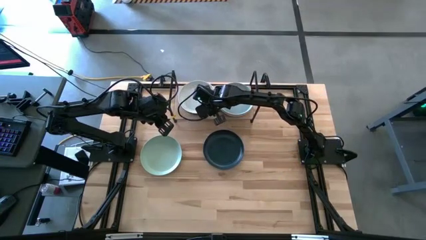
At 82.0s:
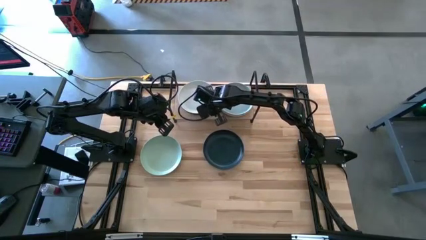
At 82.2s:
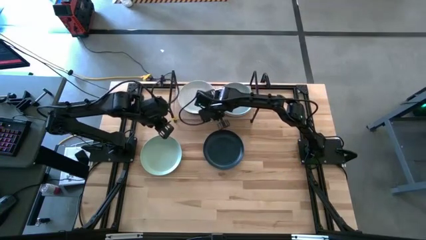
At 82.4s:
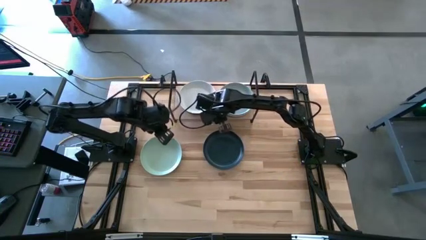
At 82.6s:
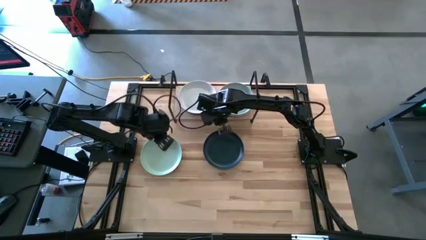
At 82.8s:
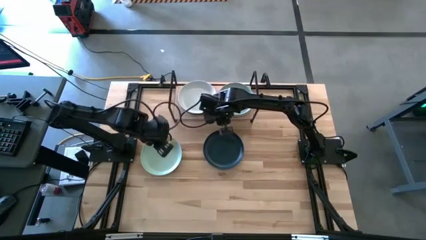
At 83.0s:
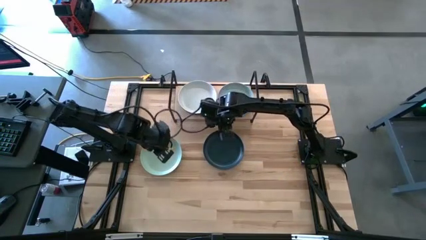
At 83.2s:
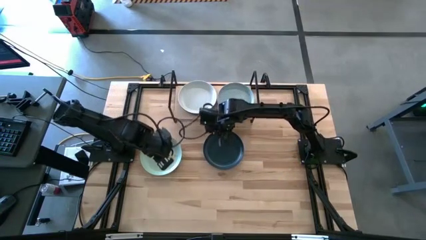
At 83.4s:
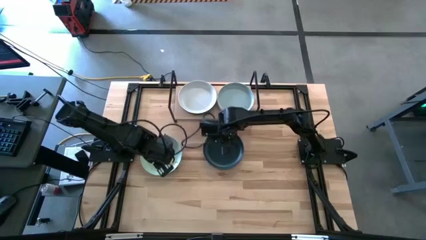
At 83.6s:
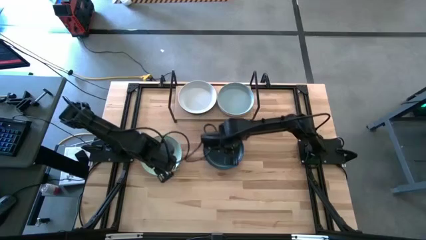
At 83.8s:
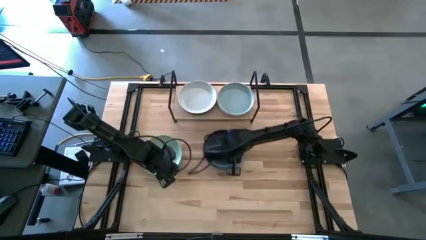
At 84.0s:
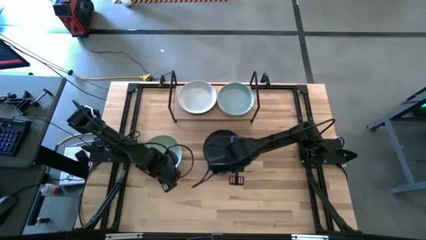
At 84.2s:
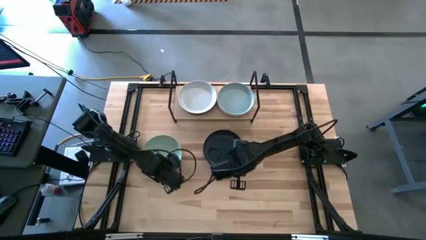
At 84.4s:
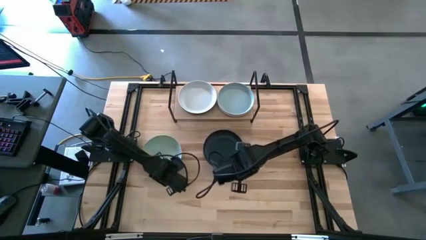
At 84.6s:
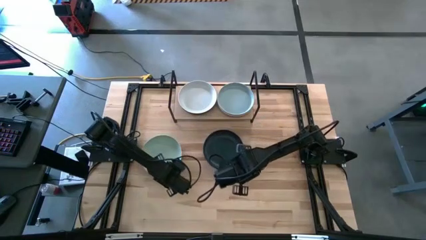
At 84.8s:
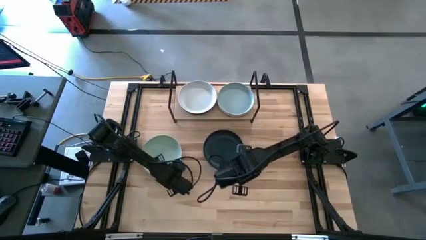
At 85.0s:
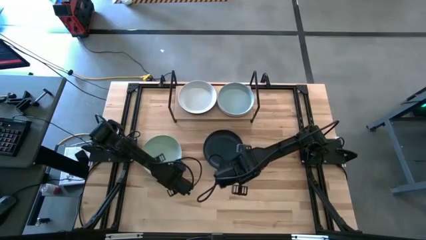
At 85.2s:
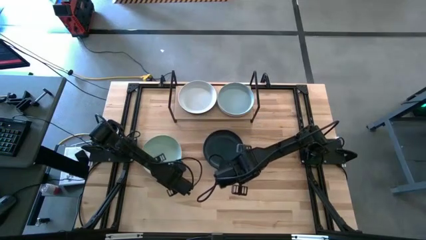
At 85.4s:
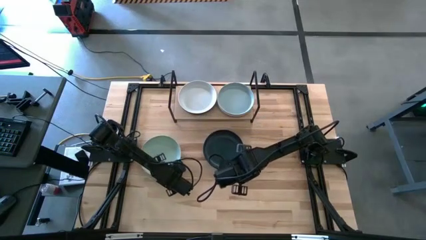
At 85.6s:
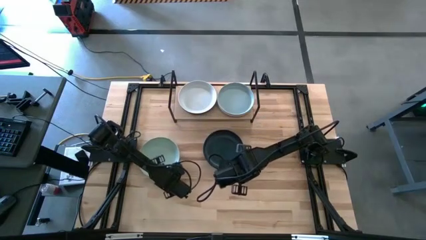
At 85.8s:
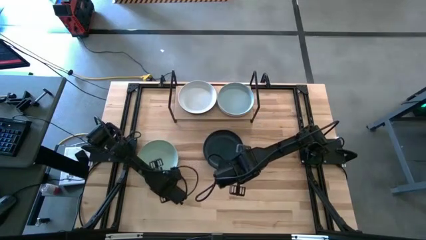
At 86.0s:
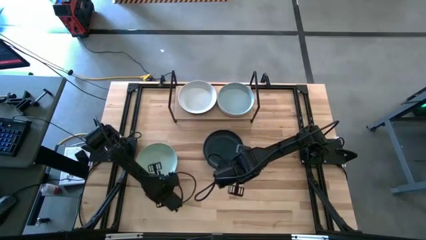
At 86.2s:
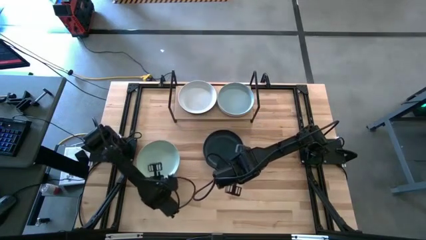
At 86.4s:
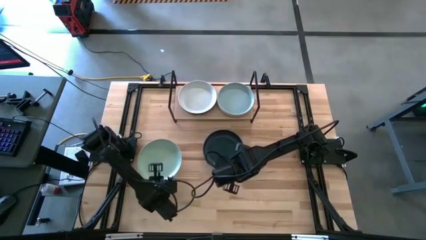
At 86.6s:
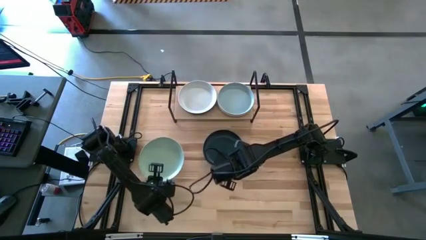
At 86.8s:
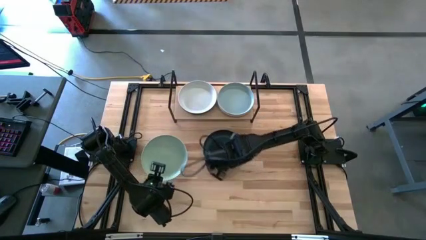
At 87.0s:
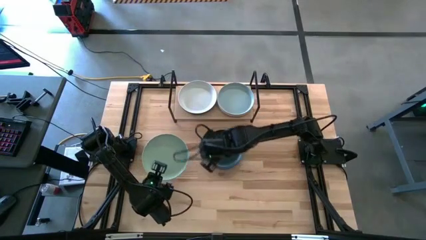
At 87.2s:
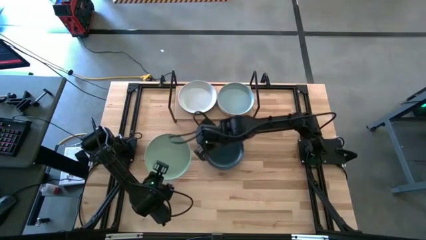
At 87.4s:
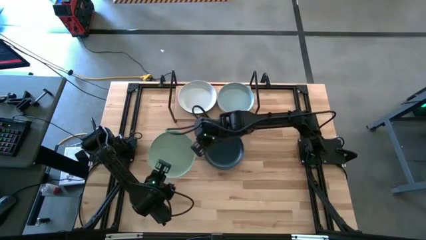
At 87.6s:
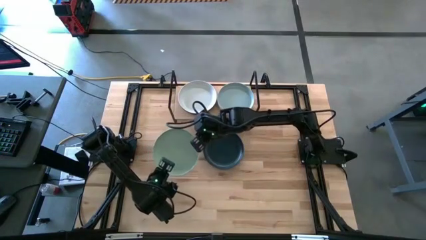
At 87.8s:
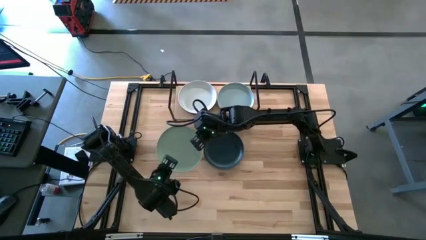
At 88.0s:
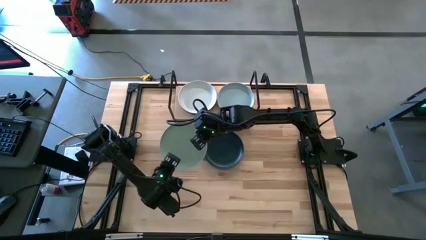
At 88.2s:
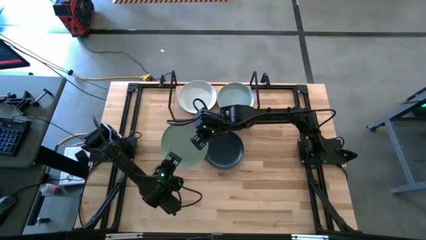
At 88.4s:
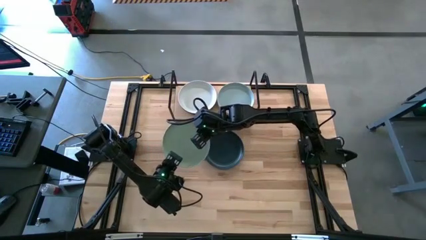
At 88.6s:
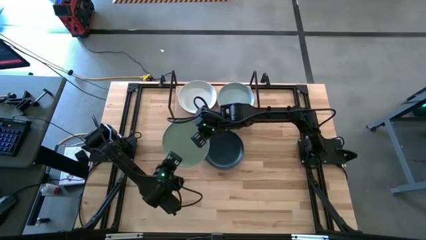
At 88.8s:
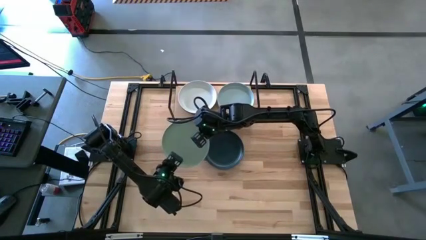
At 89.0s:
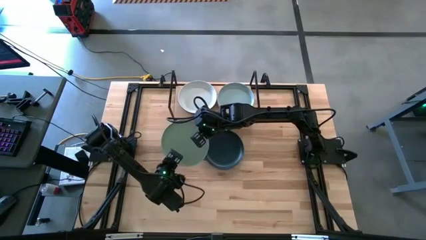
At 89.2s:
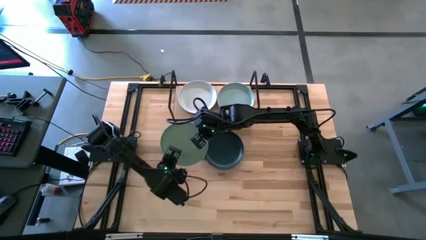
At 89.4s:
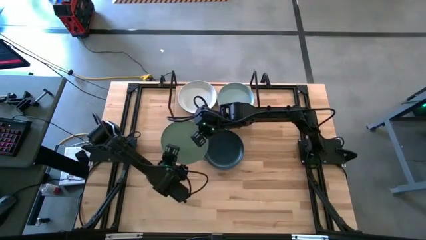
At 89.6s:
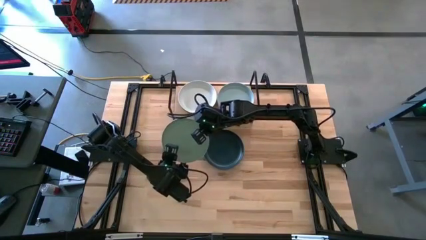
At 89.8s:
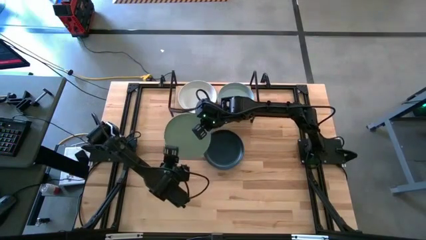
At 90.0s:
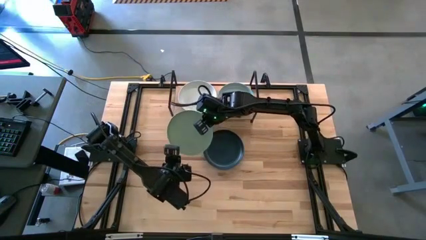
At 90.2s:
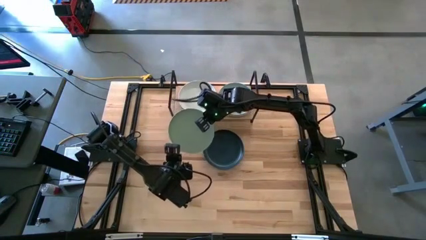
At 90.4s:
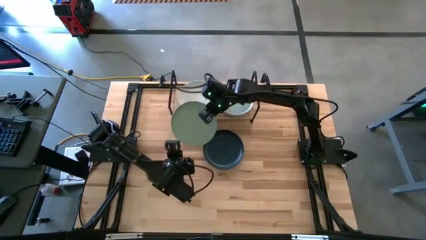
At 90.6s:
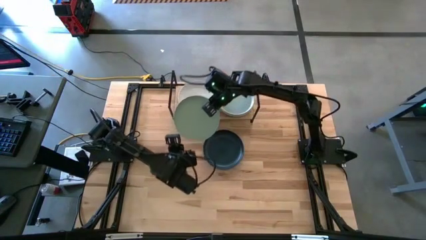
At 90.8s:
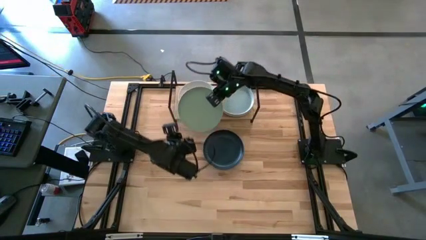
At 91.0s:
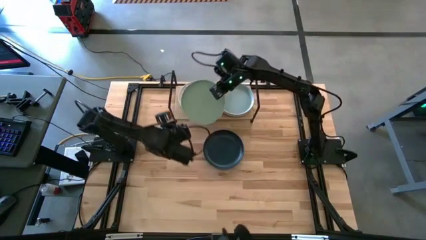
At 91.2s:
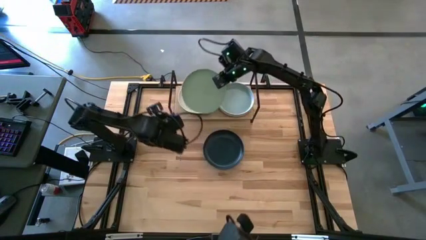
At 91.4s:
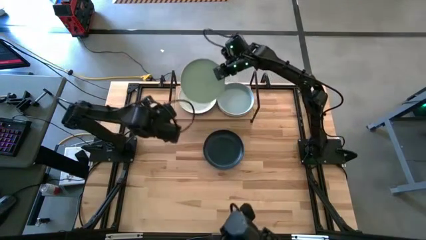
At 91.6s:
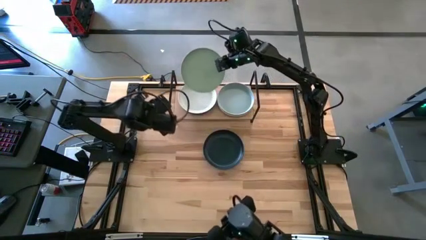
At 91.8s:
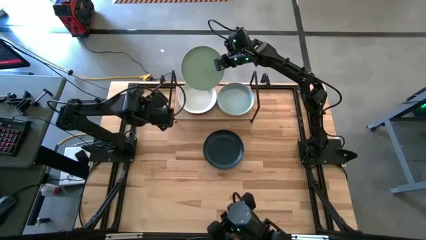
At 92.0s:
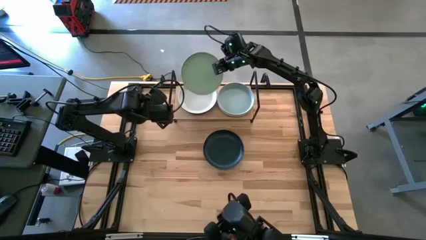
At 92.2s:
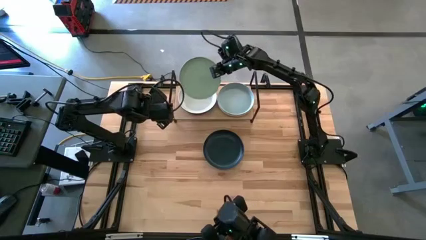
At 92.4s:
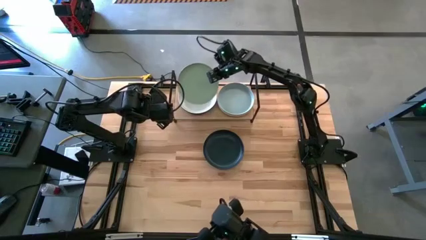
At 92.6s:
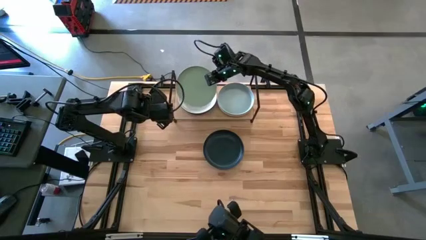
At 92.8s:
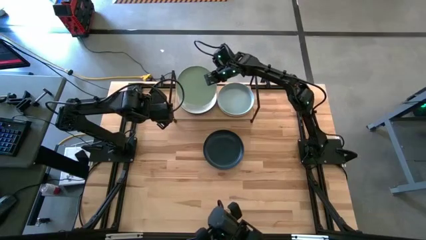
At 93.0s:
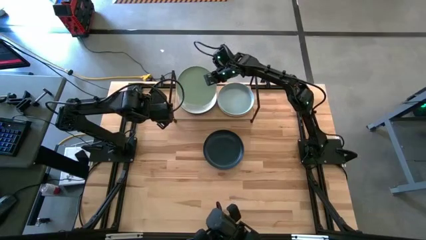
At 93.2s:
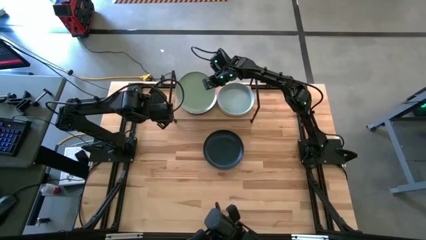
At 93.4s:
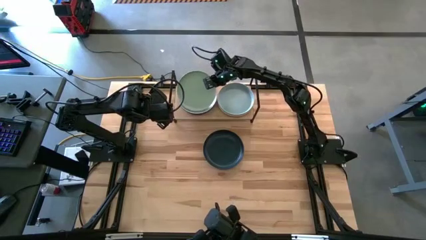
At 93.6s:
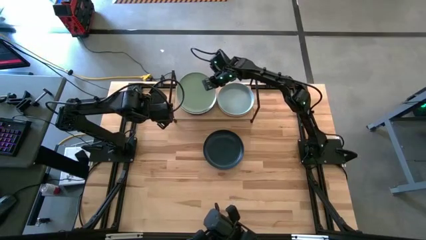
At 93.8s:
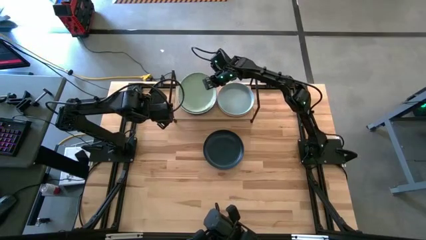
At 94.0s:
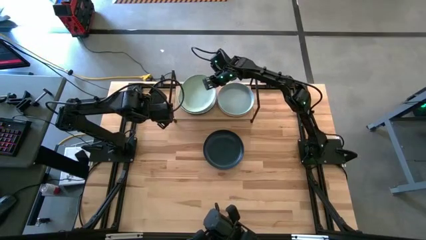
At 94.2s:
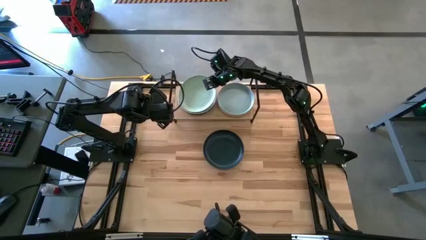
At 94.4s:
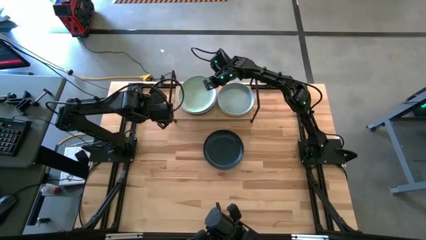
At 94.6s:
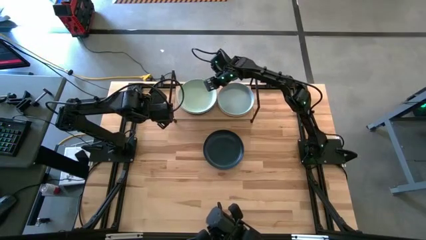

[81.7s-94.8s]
Task: Place and stack plates onto a shelf
Stack the green plate on top of the white plate on the shelf

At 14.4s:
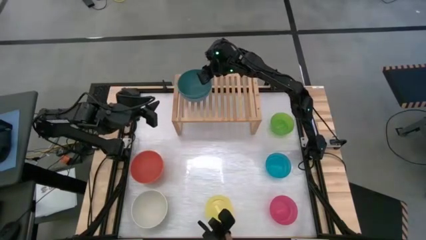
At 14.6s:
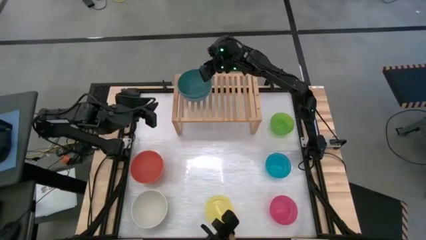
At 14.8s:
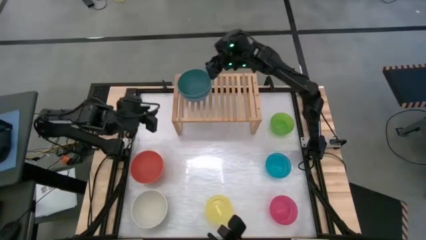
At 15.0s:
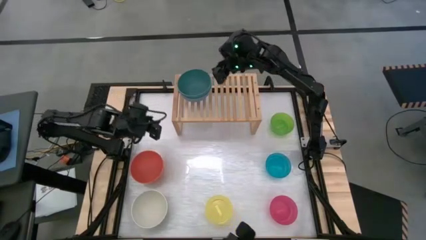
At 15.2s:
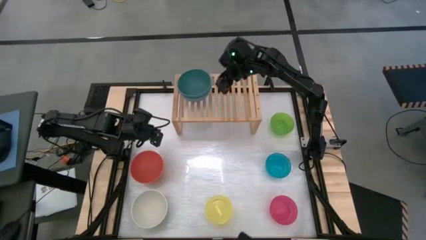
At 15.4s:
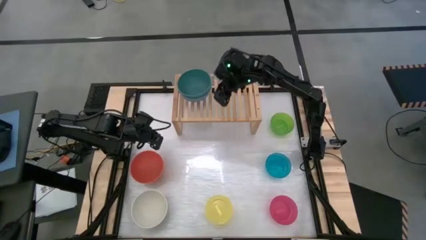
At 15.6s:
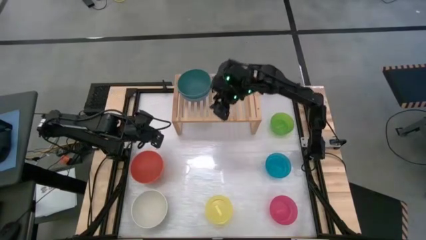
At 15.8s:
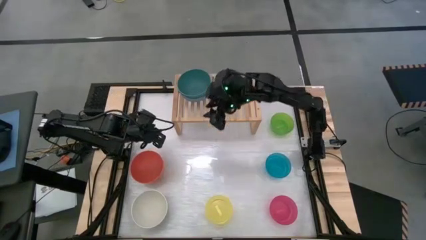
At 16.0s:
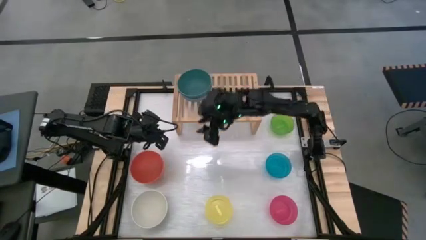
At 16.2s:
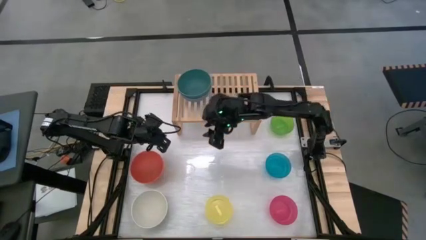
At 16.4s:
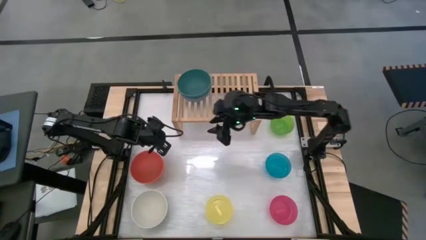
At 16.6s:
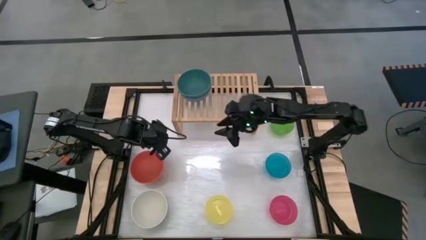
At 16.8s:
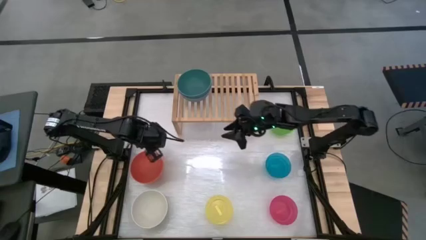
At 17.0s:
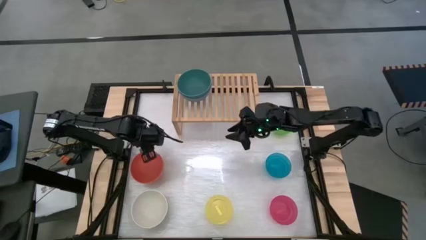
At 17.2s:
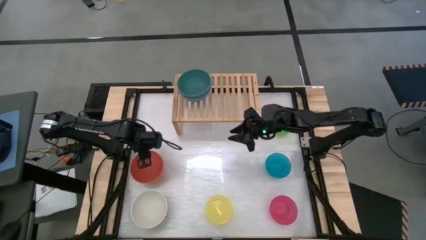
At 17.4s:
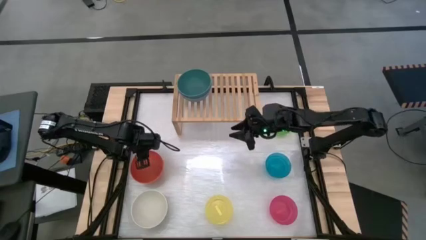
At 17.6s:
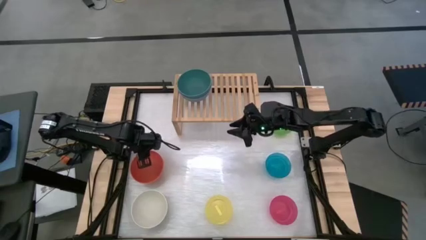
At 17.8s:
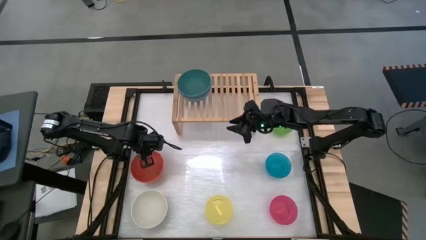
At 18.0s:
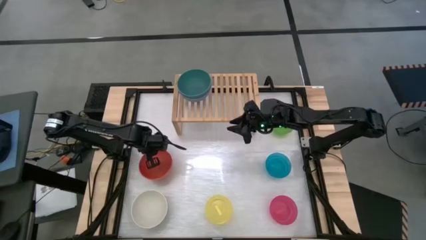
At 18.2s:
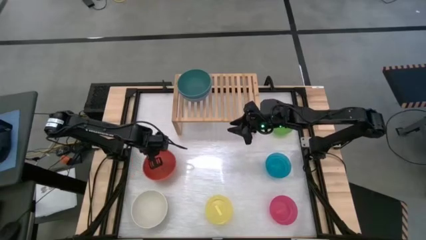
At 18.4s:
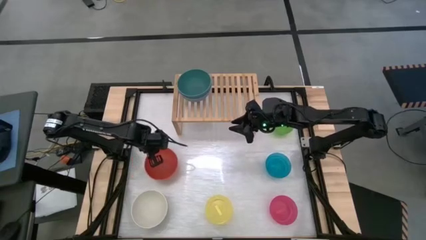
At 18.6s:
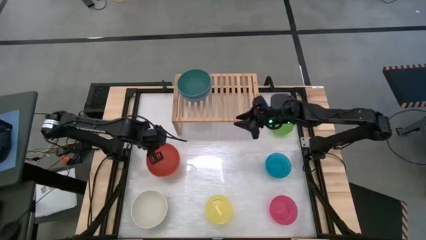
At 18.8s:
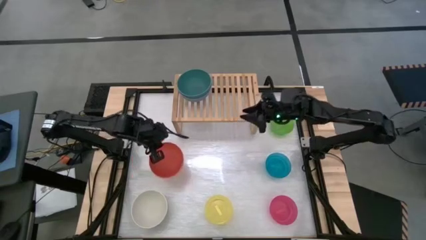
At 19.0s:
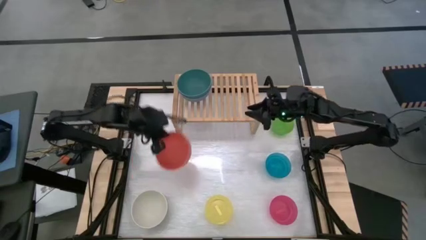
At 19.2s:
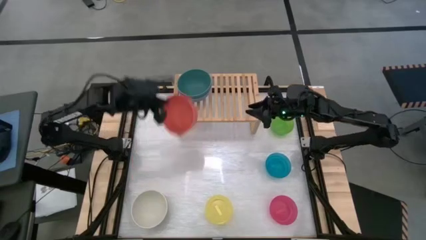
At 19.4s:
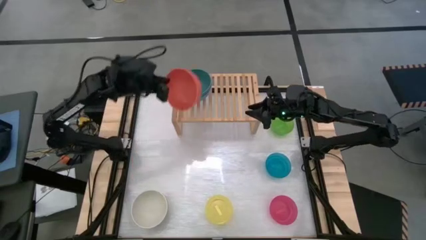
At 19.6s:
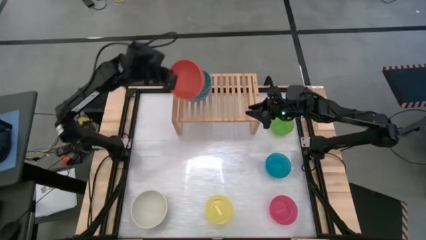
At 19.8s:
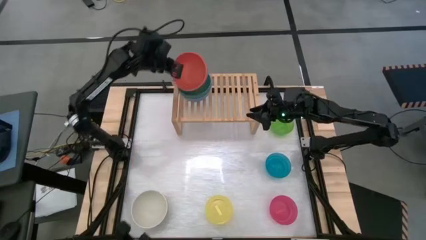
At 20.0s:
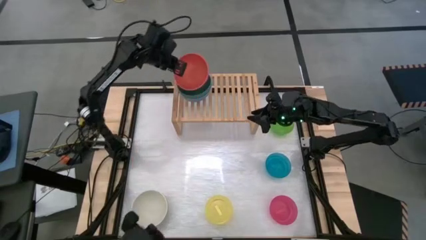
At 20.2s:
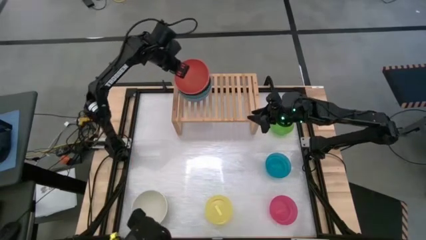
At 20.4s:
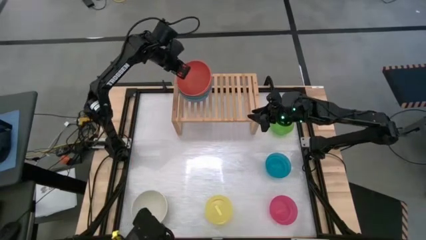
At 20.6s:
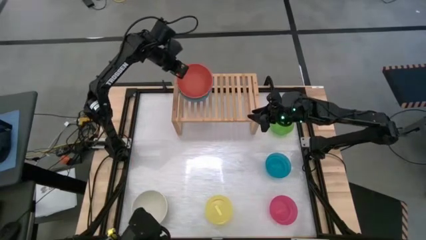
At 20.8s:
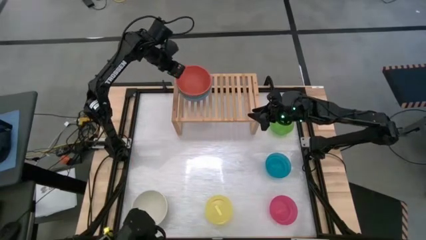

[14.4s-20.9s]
Task: Place and stack bowls onto a shelf
Stack the orange bowl on the dark green bowl on the shelf
